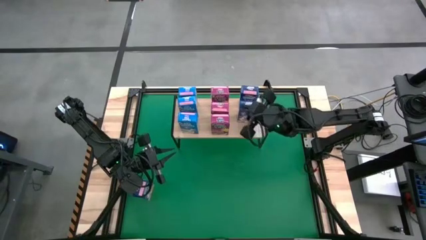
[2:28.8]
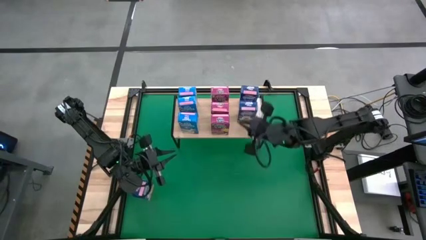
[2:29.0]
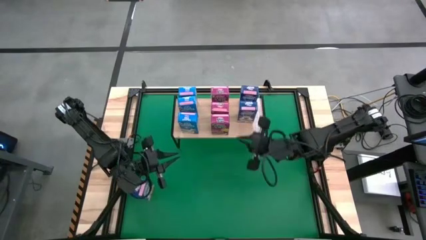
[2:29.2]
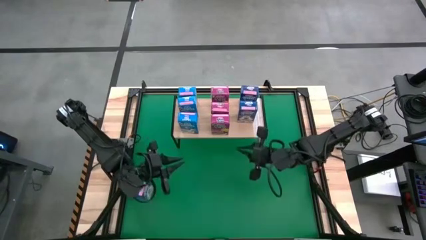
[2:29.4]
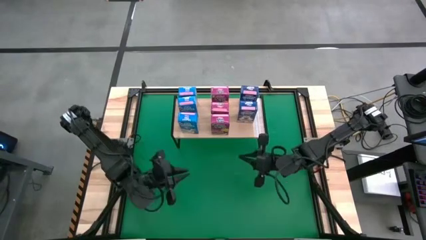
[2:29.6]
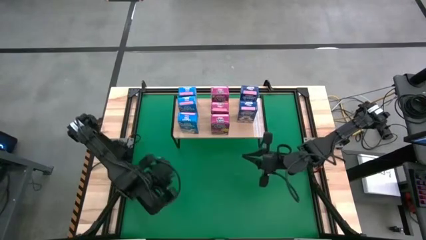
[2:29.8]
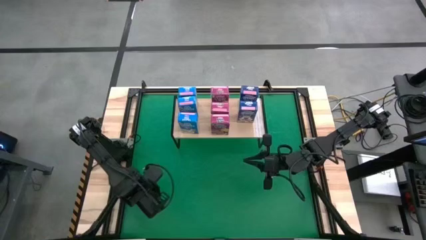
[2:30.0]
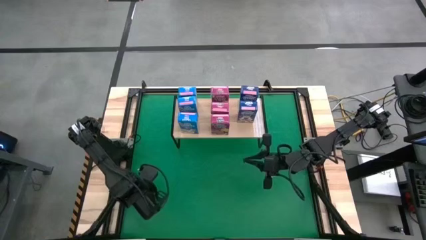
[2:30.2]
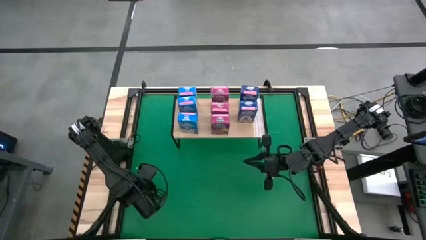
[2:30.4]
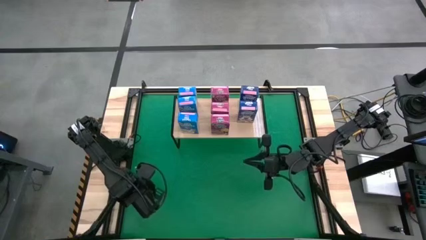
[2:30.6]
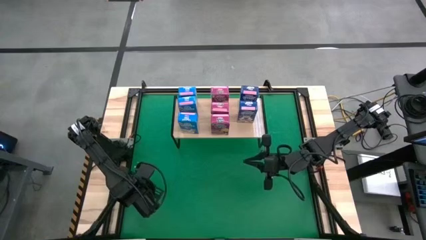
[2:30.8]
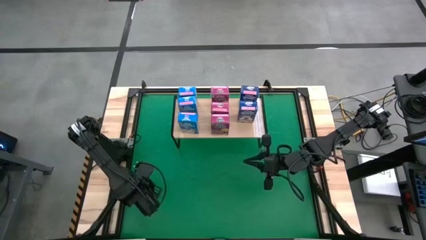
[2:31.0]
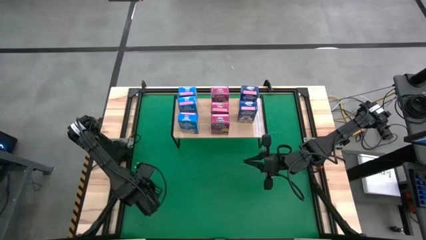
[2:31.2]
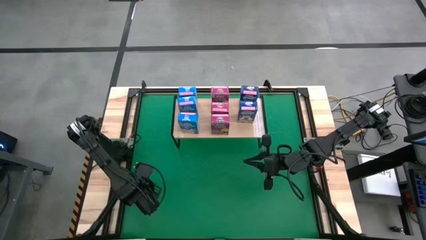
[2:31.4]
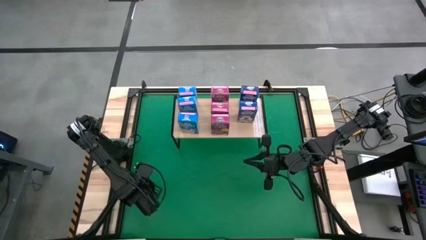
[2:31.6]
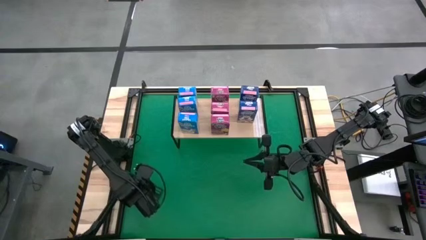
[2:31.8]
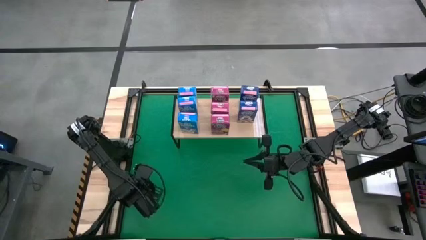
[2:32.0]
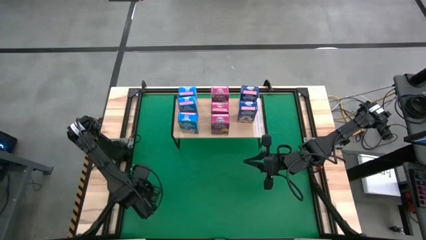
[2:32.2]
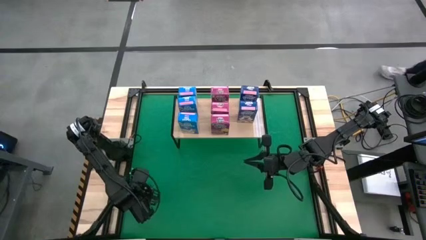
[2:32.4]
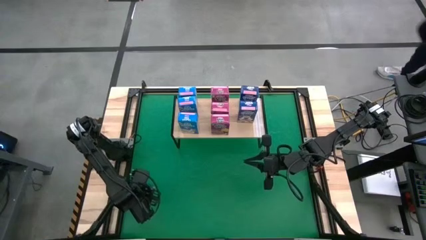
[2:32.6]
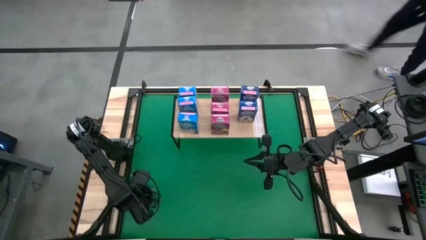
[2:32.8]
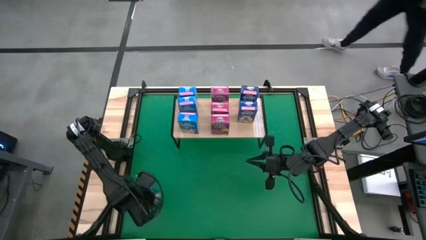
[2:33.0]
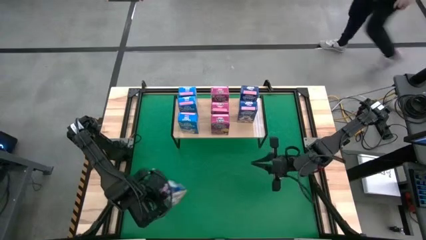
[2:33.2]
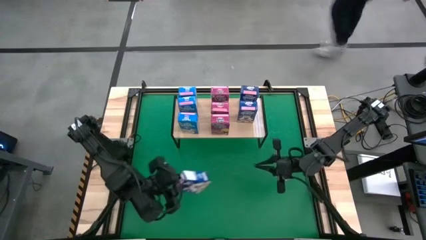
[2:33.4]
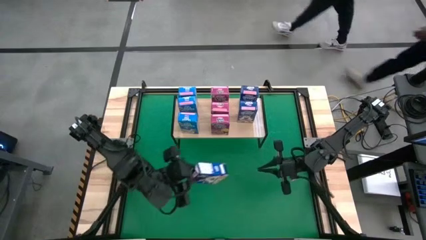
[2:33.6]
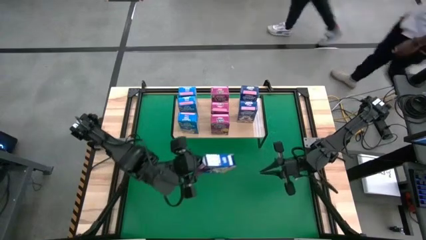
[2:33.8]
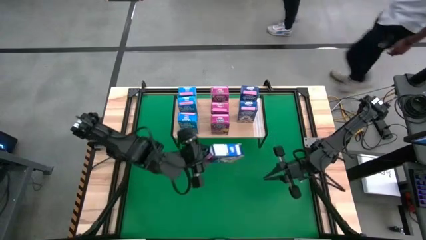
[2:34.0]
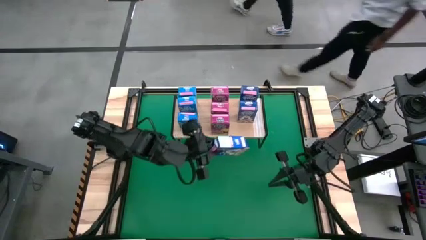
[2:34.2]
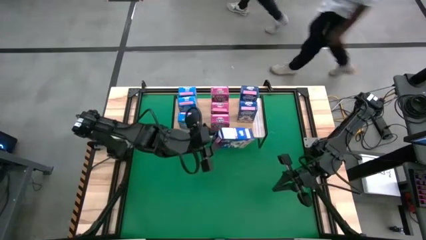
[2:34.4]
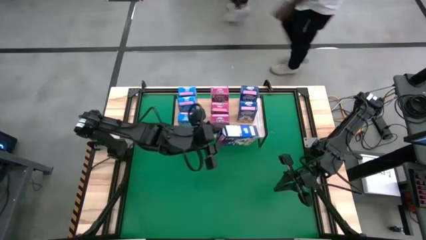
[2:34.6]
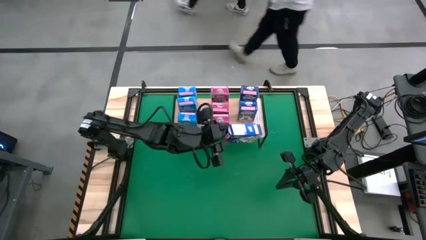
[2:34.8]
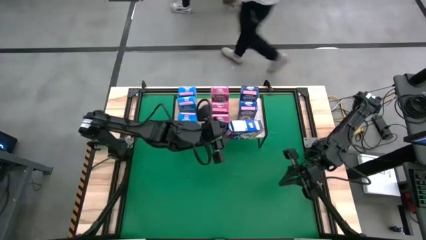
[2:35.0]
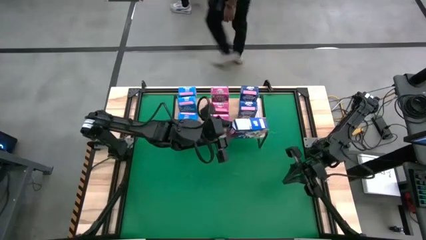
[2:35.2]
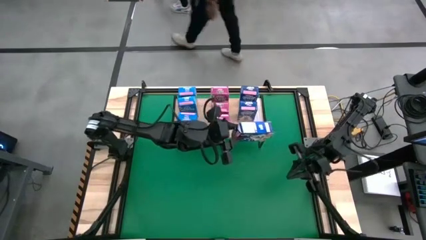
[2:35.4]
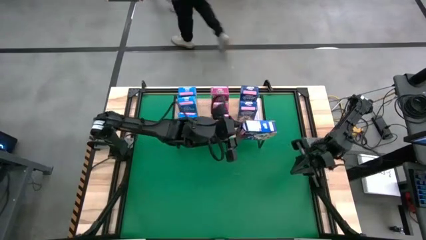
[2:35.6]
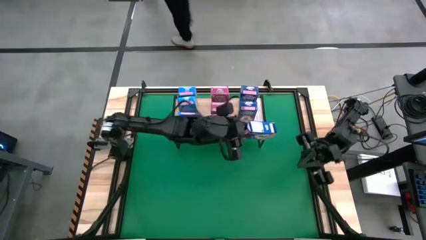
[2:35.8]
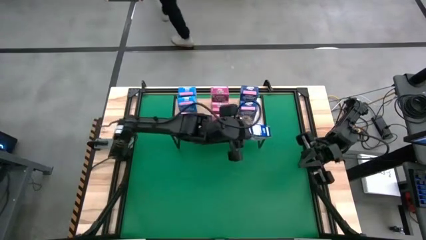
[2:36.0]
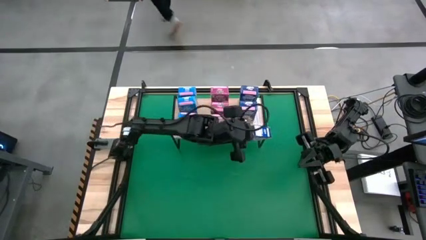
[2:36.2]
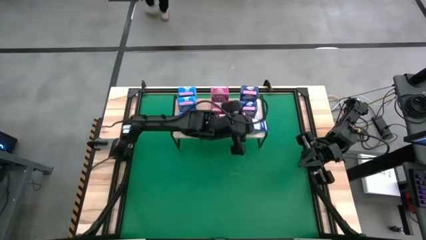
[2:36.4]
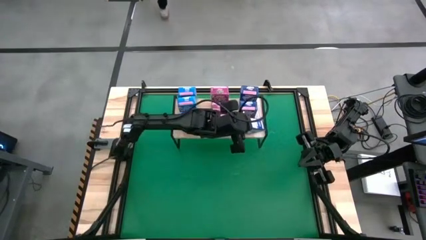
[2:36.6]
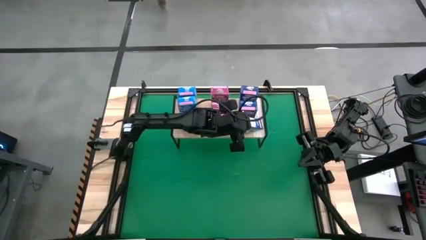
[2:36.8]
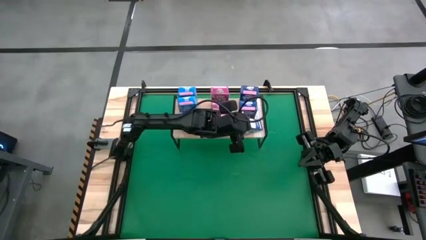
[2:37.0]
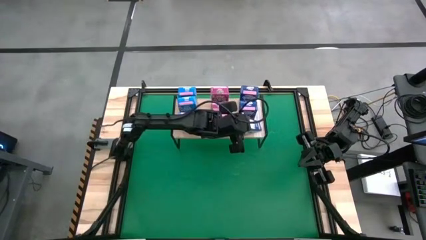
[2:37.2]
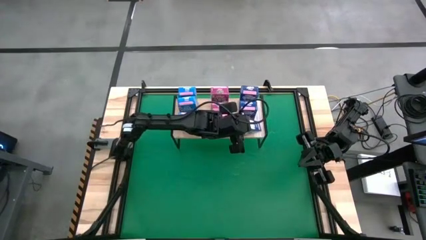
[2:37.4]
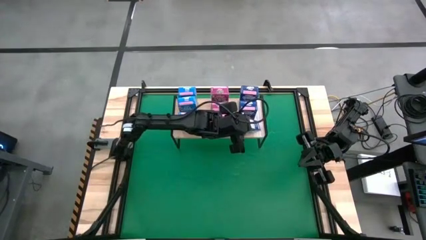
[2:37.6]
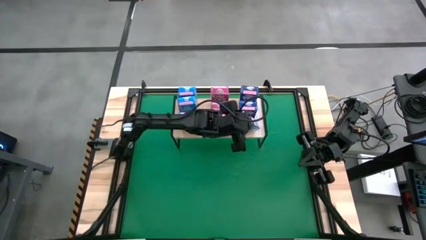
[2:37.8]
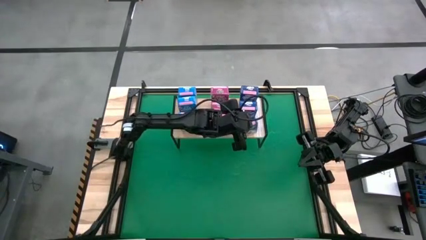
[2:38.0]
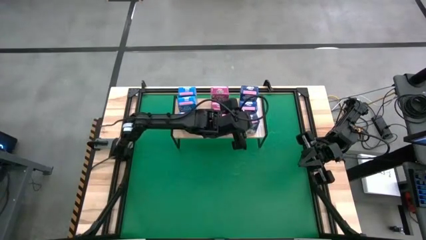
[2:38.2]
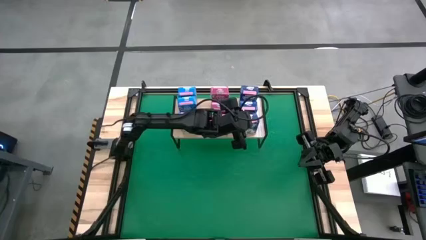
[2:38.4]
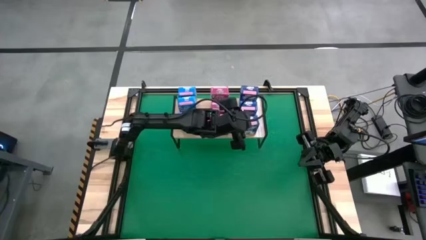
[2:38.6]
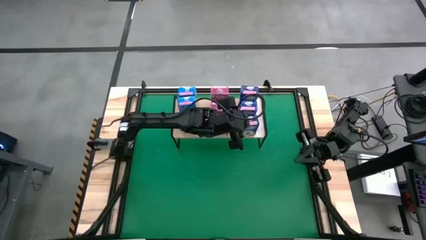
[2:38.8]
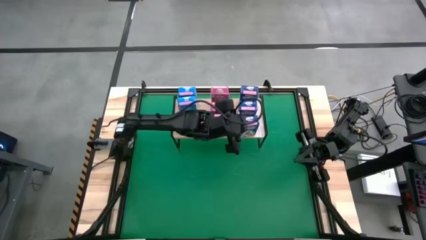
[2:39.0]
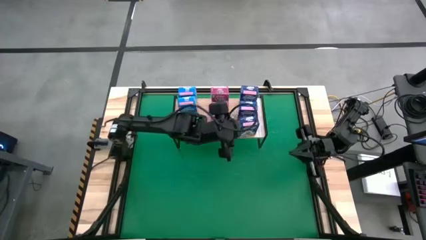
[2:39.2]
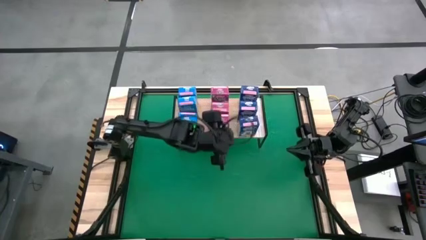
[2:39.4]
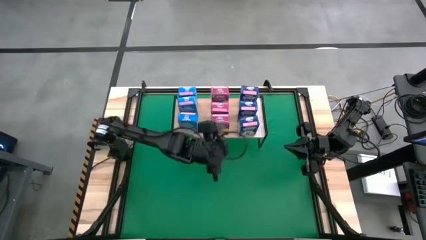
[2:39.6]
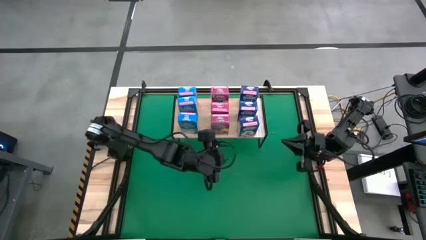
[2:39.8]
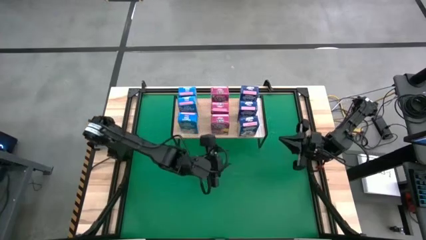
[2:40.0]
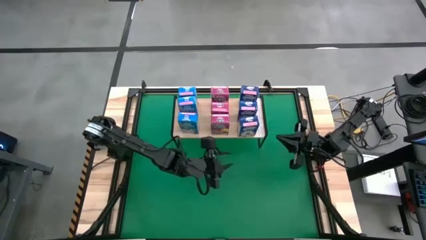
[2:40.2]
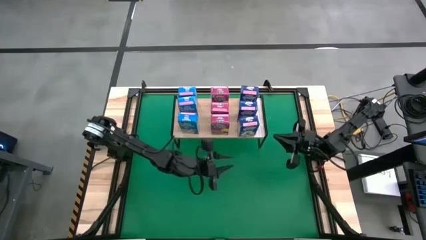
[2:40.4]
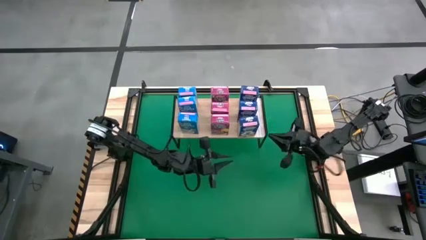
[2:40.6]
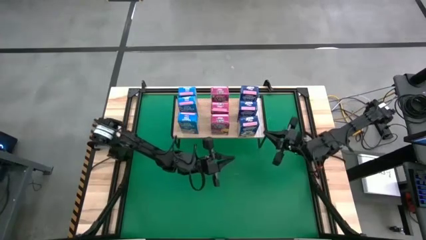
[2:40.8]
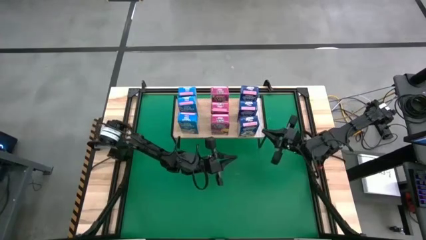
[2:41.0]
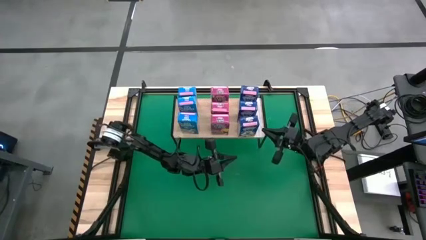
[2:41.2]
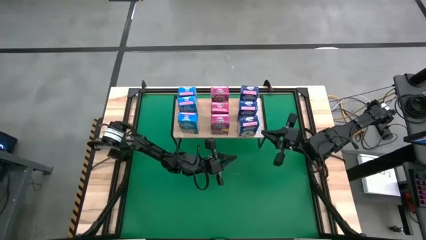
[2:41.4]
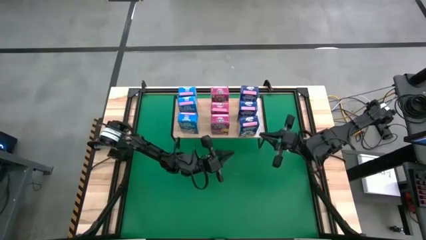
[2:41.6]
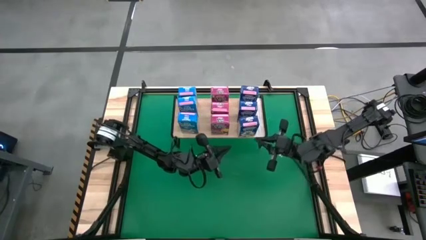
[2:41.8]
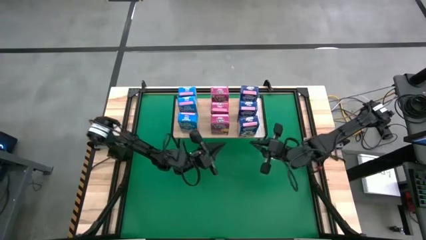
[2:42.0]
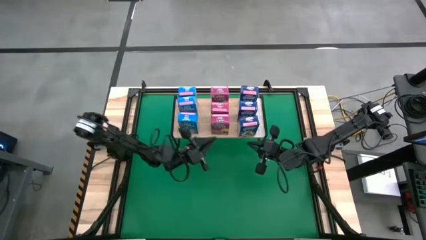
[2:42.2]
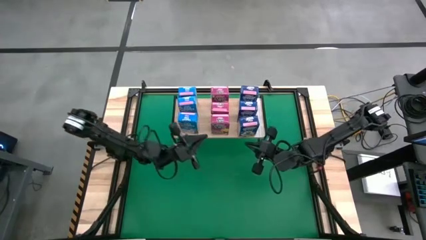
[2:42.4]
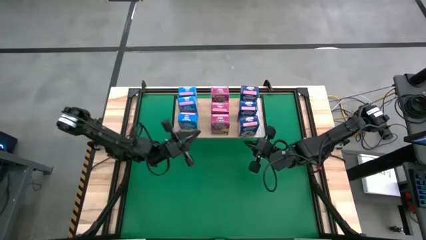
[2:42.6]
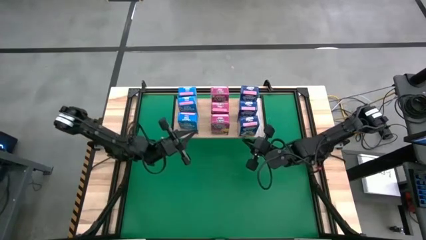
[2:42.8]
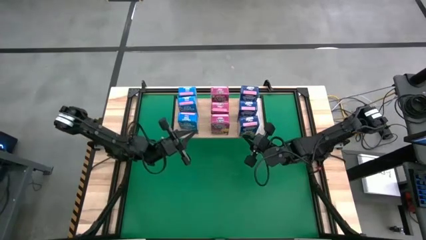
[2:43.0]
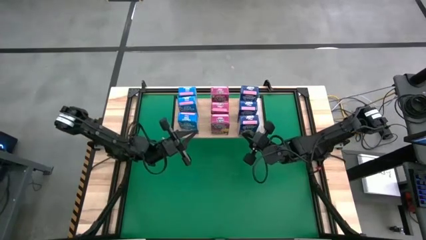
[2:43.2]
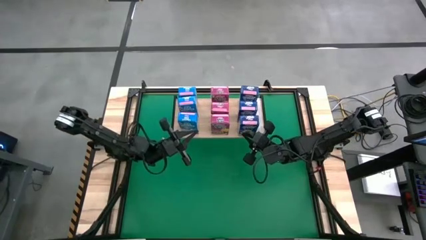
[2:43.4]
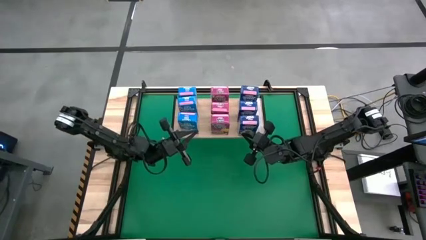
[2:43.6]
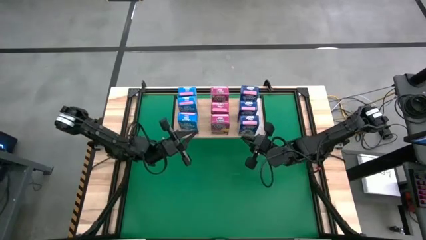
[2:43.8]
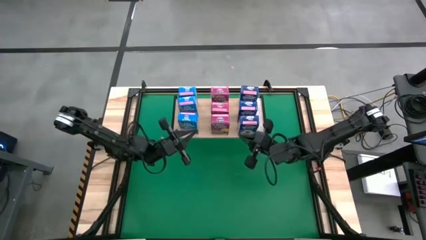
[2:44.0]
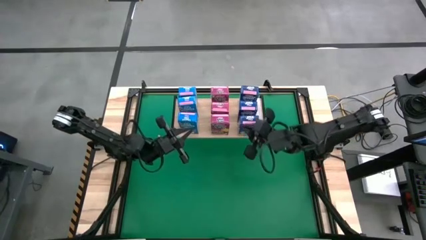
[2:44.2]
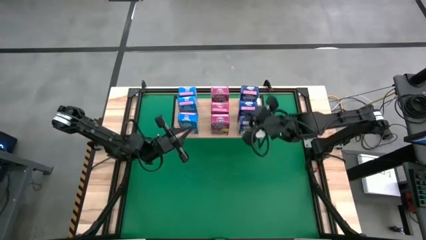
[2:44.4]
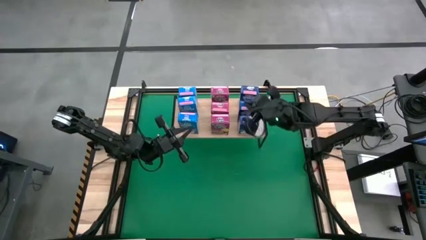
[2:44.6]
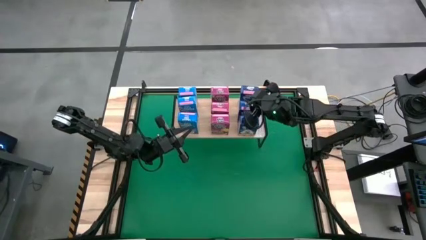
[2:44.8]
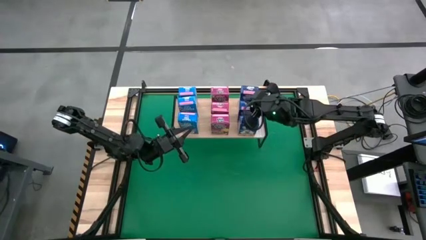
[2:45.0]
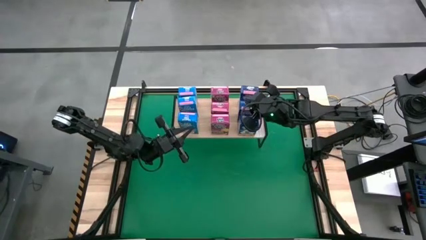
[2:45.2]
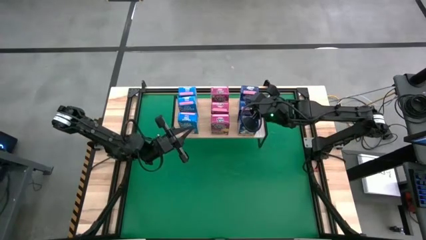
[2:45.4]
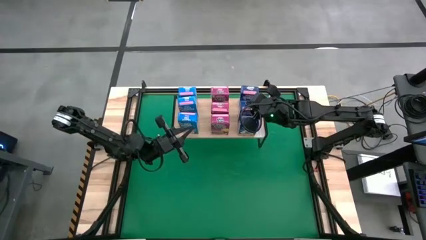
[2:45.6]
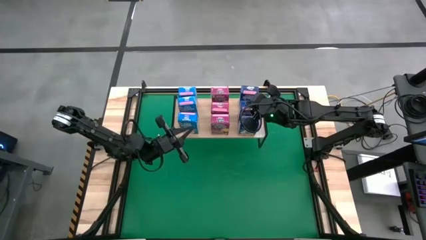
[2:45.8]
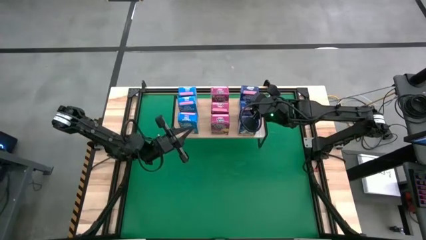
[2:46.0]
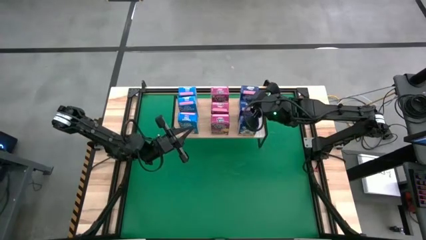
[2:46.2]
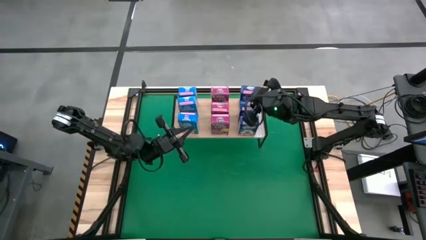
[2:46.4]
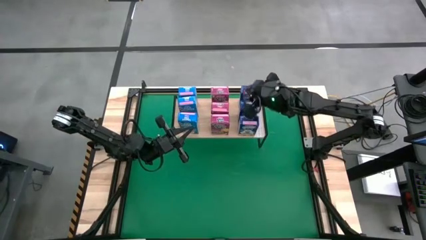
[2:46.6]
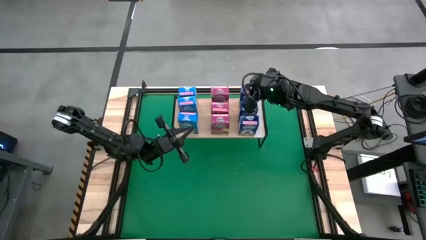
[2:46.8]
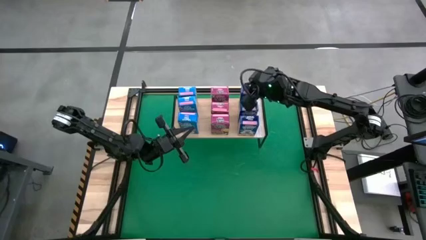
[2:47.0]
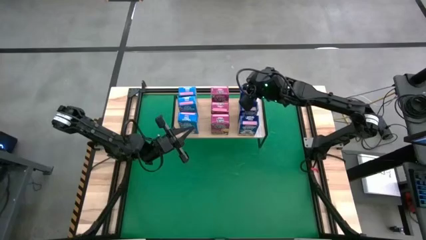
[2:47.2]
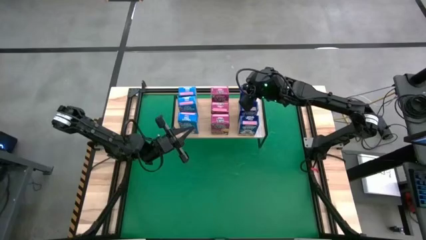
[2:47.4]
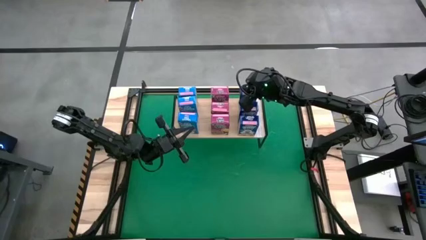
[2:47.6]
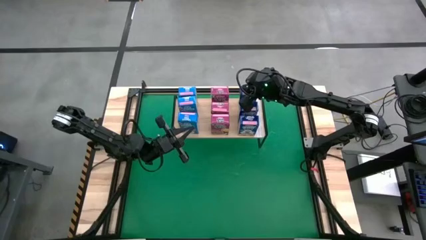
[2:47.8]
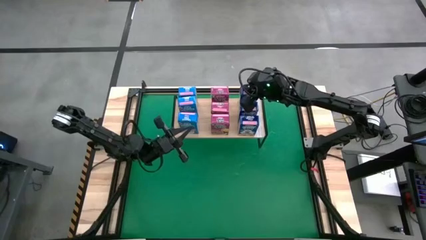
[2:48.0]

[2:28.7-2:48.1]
Task: Stack cereal on shelf
Put the dark blue cereal box, aligned with the other dark blue cereal box on the shelf
